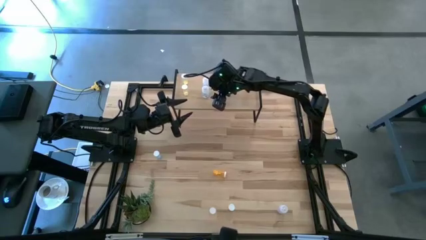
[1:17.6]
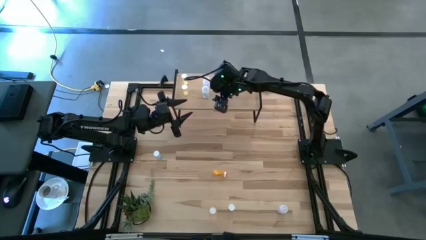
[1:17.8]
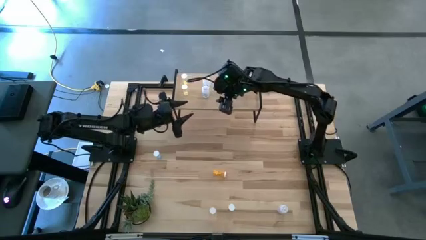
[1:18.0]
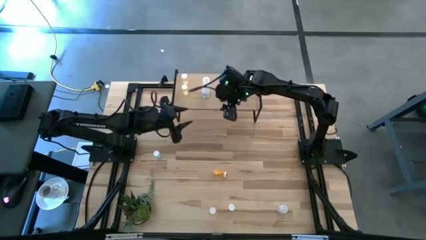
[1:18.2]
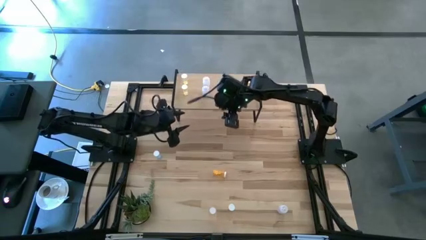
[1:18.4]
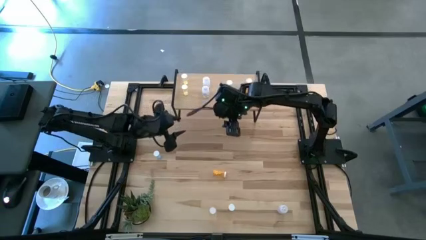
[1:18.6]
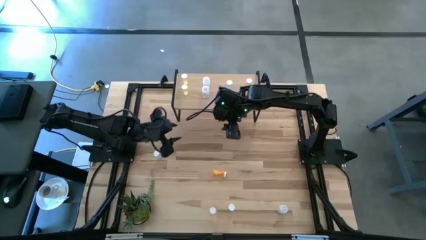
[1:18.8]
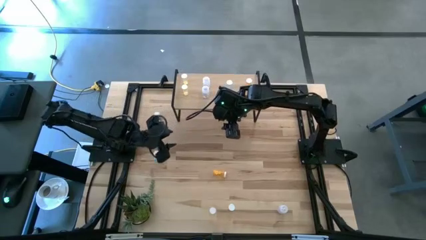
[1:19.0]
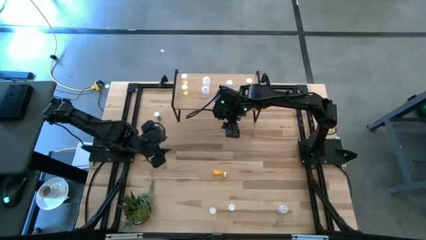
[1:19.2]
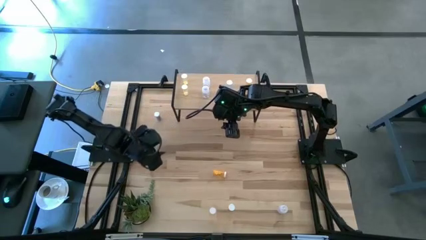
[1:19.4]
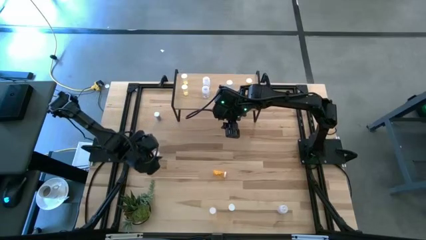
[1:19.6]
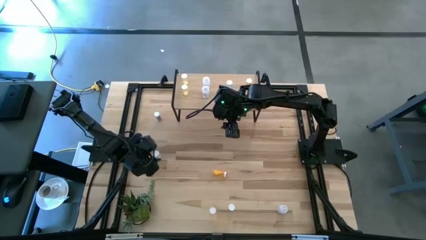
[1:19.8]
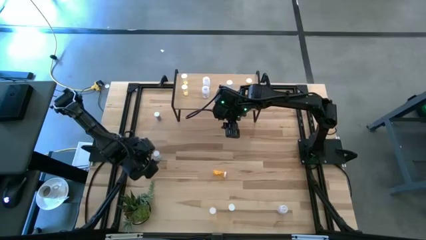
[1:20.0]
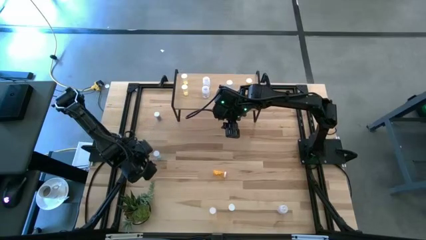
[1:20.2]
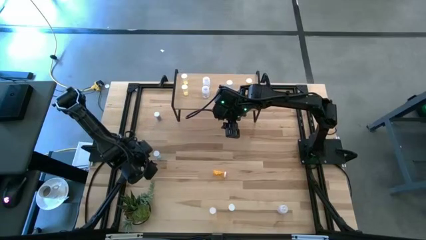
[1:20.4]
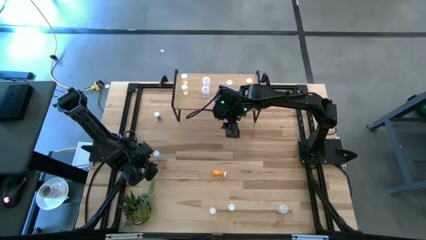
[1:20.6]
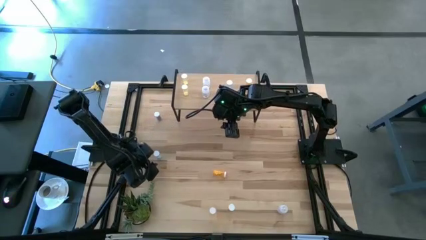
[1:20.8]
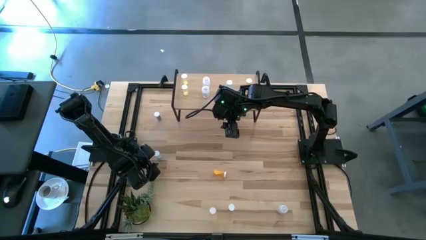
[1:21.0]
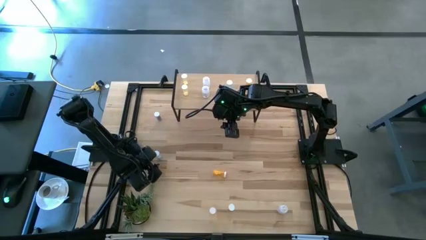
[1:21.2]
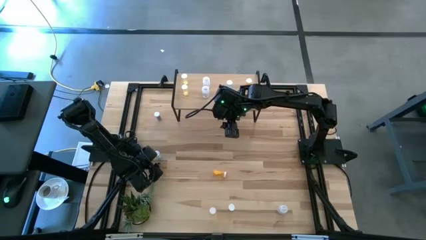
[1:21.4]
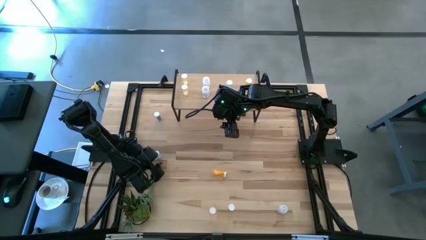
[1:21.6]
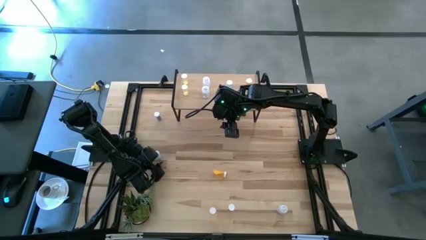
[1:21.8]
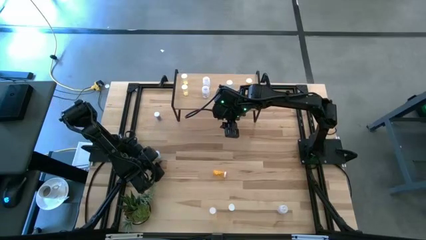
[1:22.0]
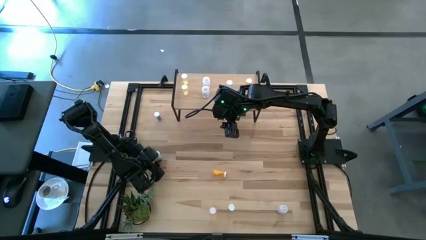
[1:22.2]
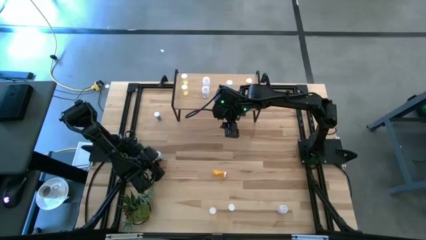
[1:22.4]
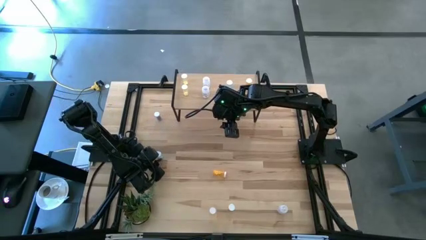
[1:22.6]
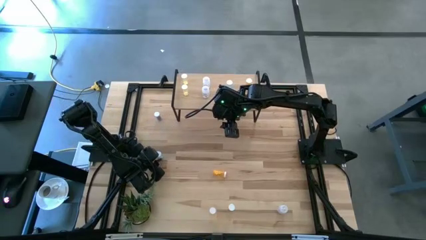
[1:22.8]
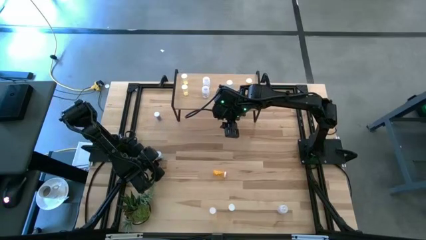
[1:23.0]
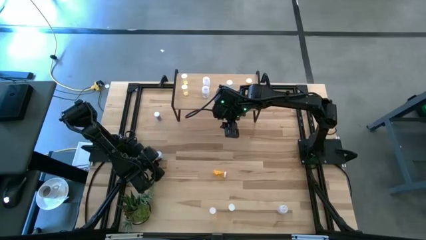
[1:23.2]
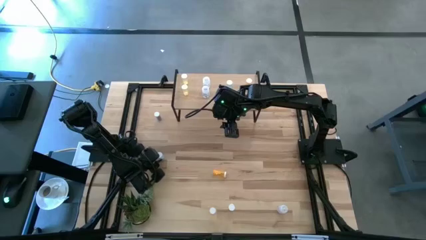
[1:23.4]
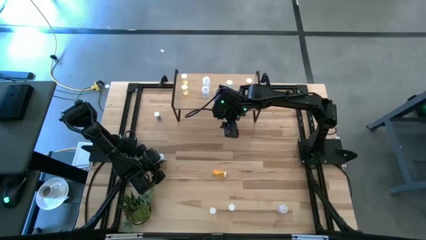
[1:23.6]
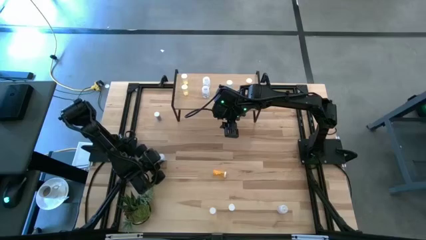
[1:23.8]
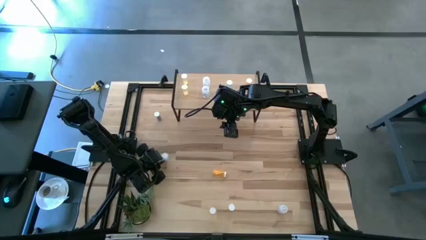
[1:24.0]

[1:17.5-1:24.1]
Task: Pick and place medicine bottles onto shelf by color
Put the bottom blue pill bottle into the shelf aligned with the blue pill bottle

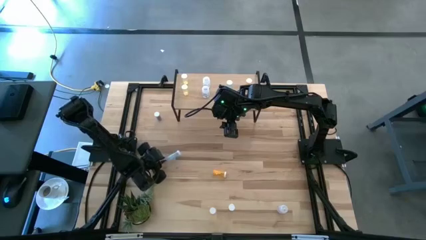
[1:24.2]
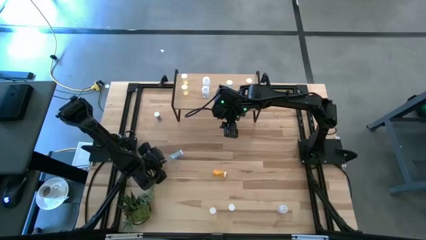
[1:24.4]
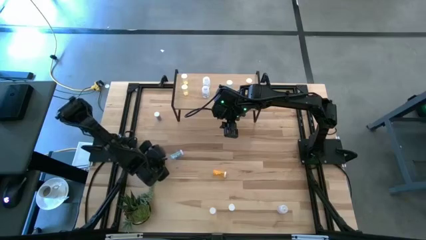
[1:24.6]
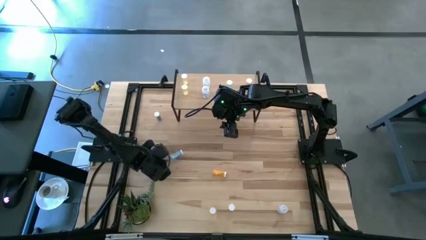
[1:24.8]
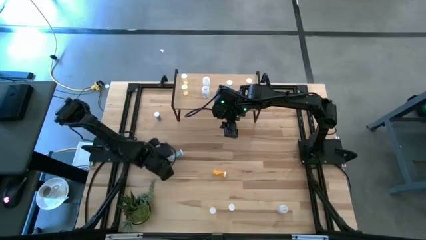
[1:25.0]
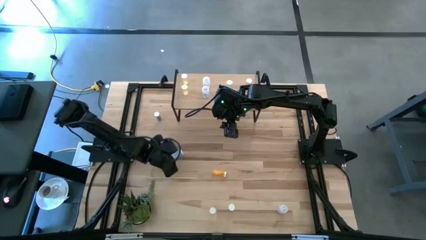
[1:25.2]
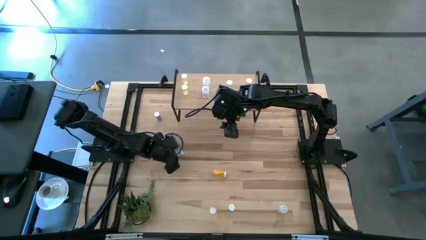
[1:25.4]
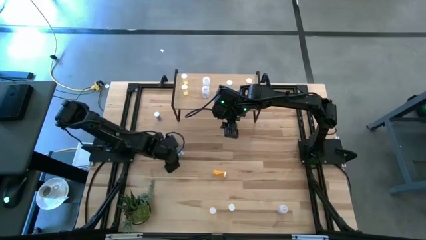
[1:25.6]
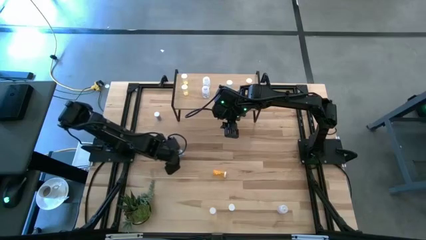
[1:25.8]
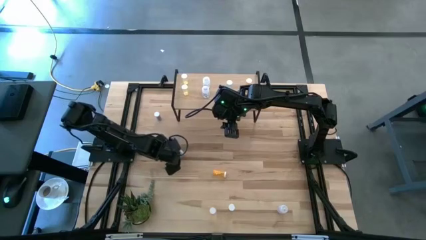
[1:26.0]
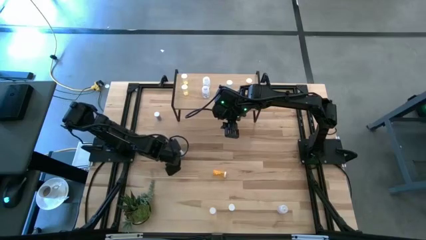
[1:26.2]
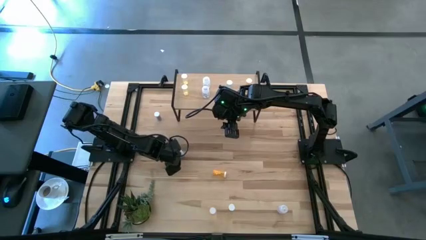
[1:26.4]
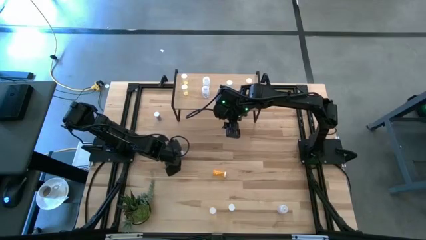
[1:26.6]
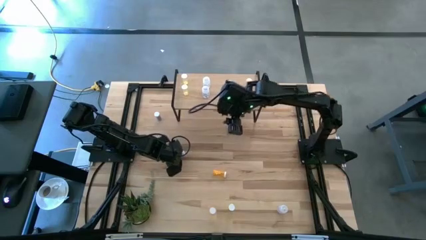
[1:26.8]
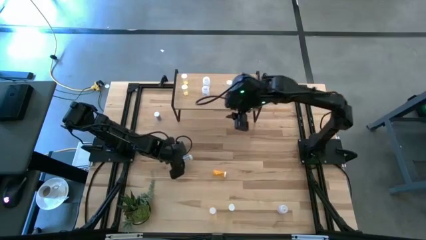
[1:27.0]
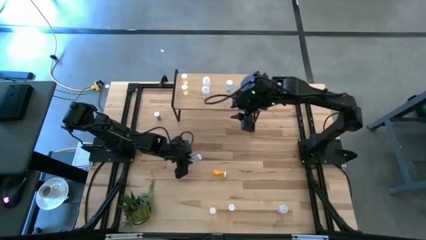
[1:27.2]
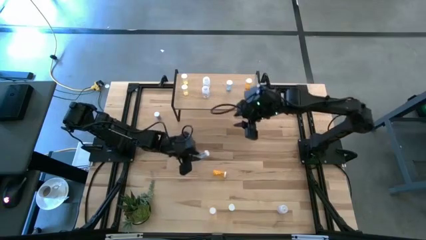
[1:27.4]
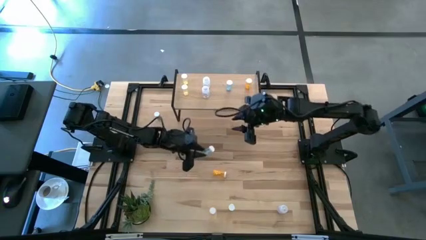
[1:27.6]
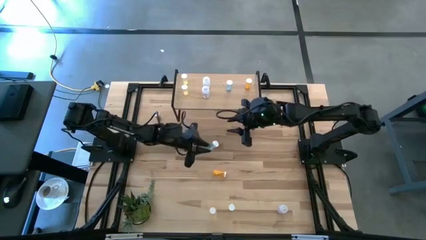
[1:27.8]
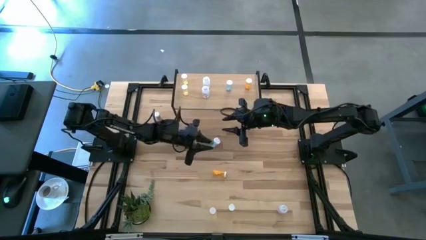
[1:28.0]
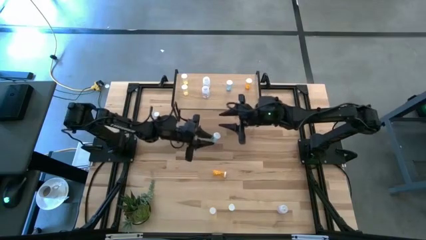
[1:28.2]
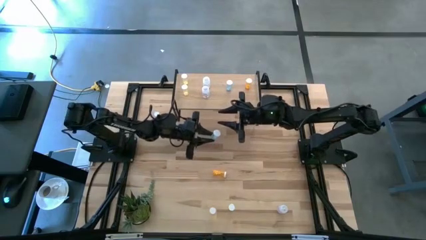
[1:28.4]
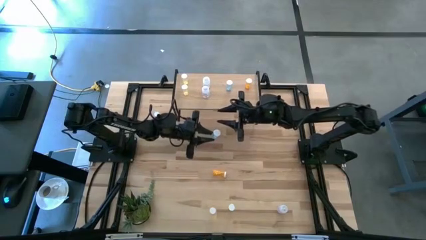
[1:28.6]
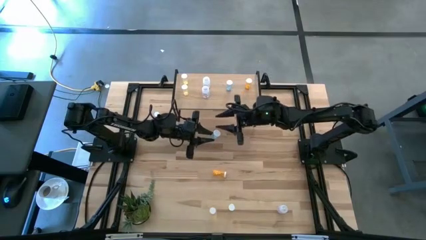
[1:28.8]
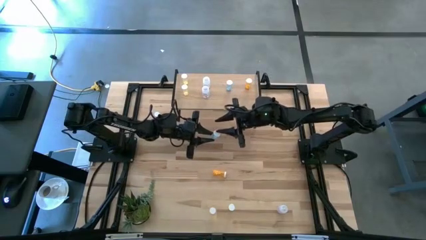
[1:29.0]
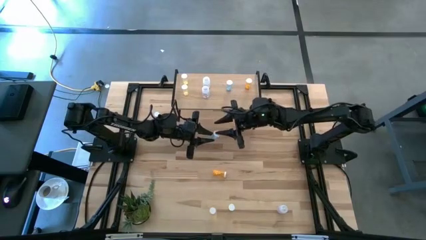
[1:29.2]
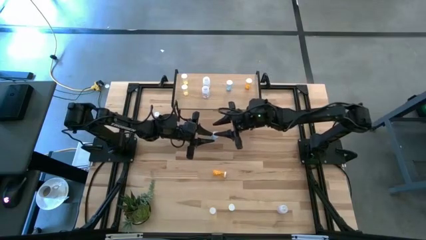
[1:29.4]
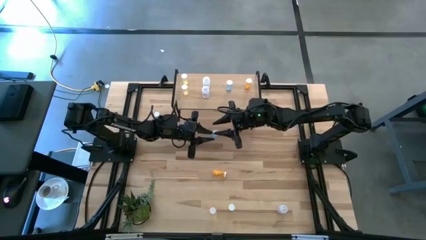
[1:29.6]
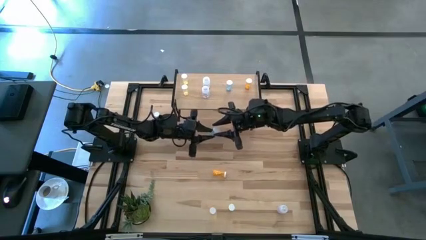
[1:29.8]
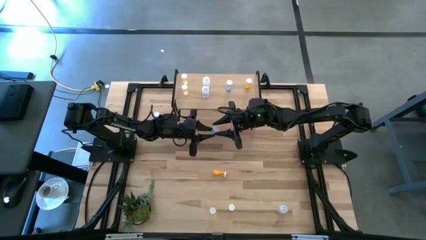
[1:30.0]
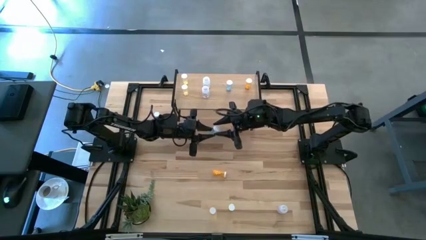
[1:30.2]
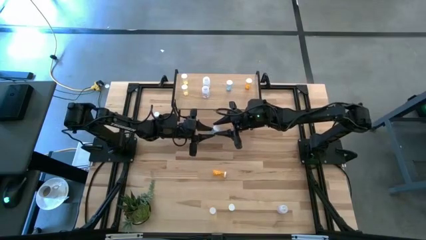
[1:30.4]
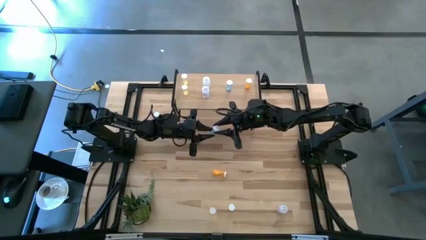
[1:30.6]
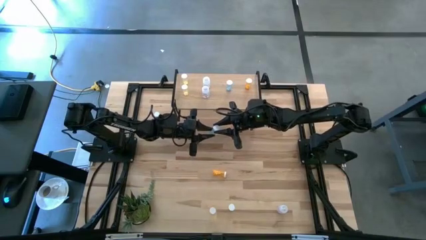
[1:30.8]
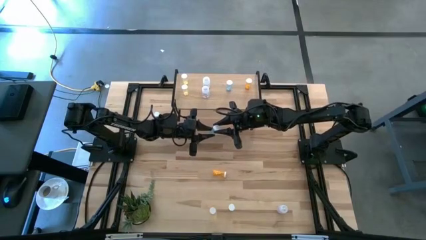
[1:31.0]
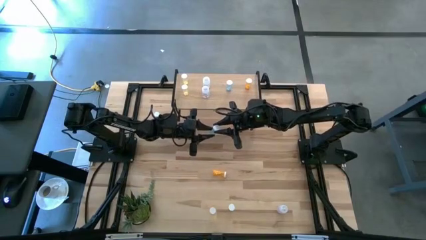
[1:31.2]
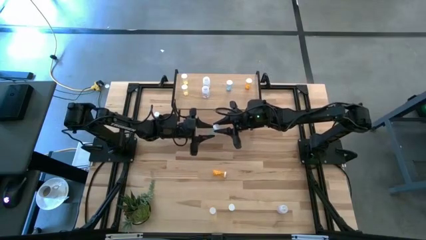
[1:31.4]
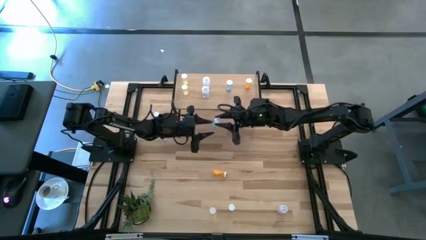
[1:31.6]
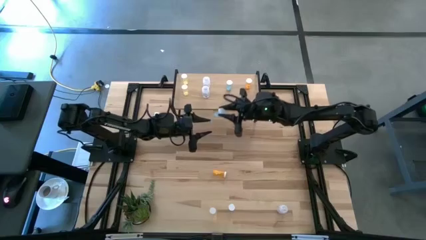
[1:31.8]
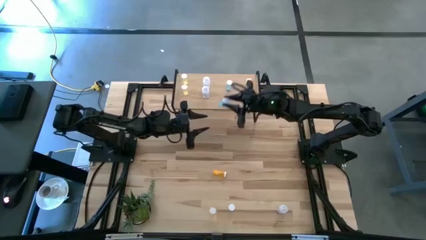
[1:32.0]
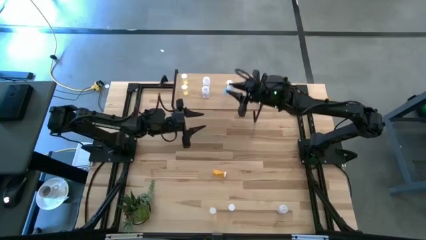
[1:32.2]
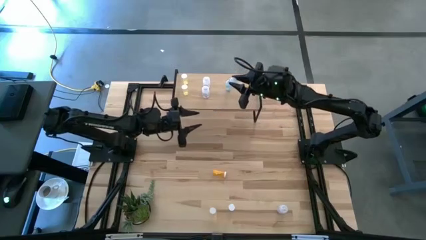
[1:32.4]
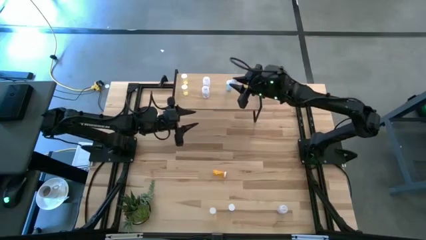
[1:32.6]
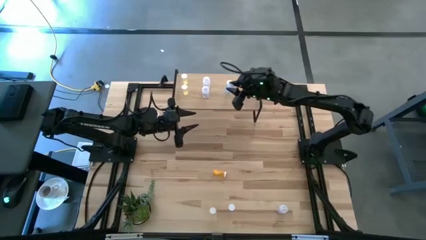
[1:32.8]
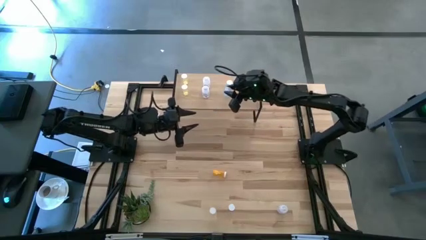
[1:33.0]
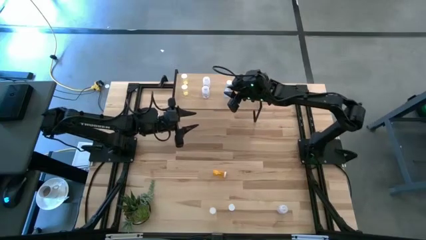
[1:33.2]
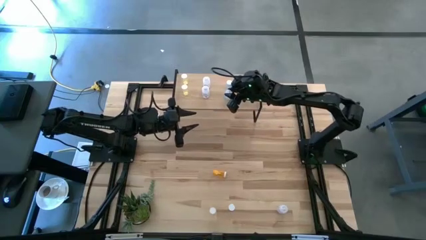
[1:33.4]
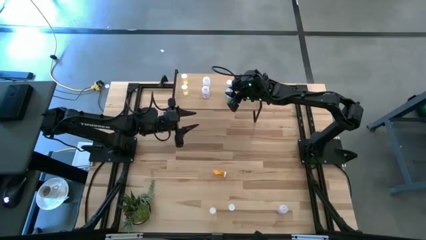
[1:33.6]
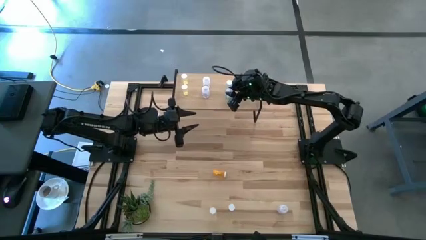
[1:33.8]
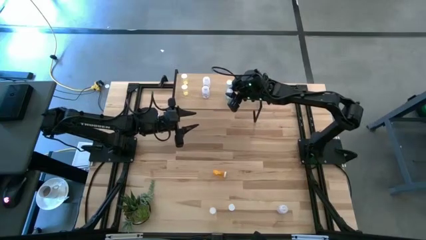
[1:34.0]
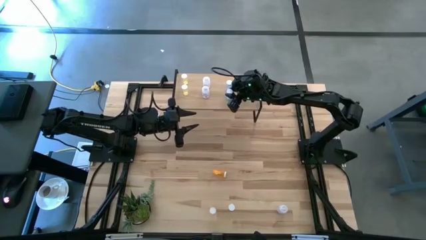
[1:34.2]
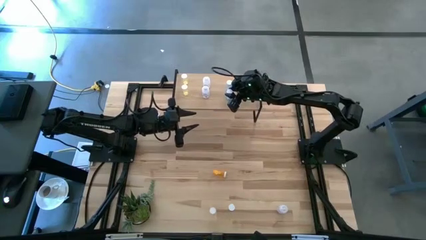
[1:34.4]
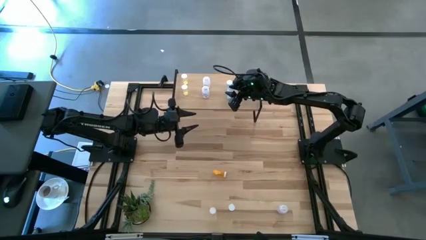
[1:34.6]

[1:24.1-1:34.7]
Put the bottom blue pill bottle into the shelf aligned with the blue pill bottle
